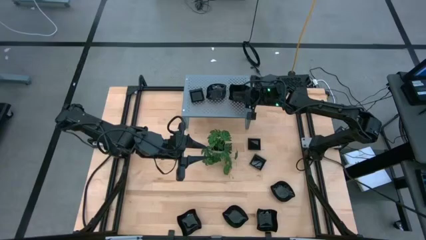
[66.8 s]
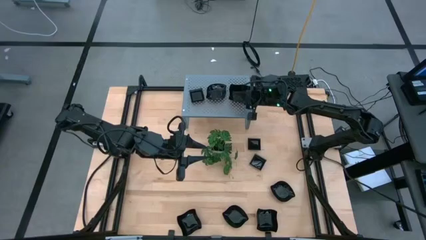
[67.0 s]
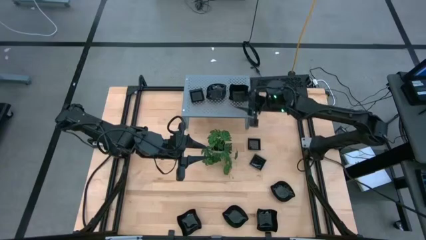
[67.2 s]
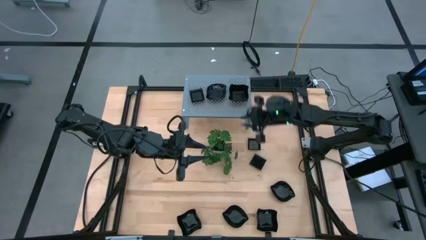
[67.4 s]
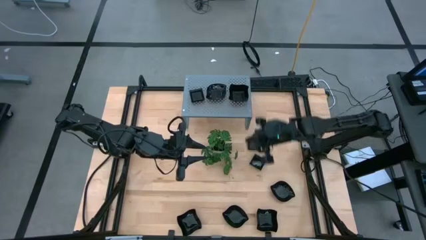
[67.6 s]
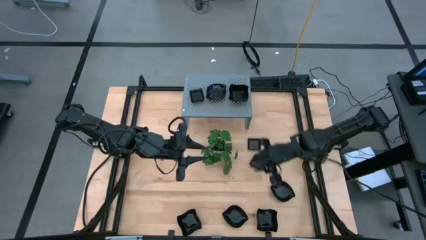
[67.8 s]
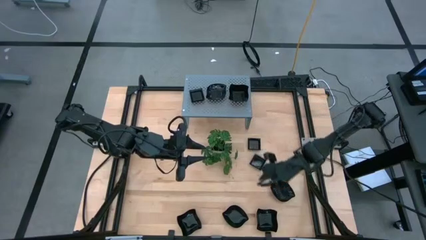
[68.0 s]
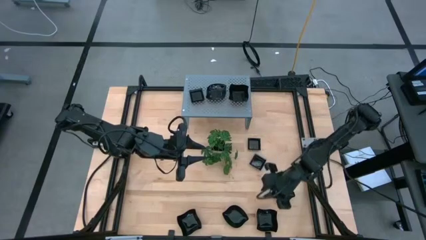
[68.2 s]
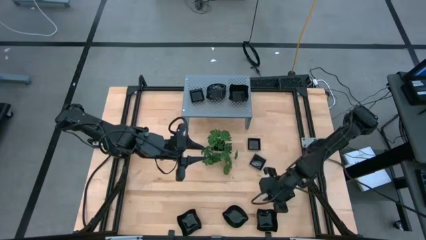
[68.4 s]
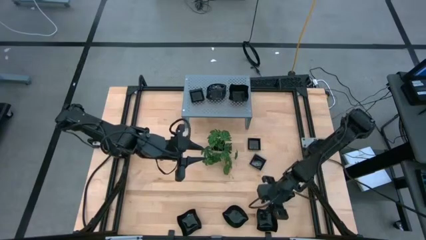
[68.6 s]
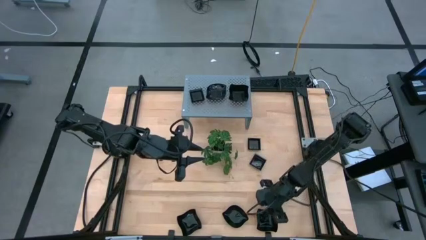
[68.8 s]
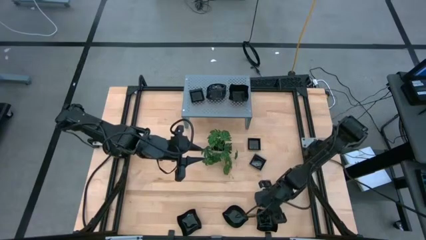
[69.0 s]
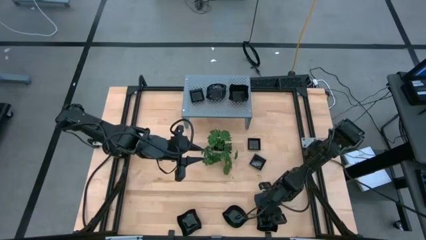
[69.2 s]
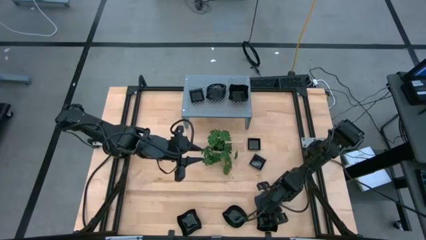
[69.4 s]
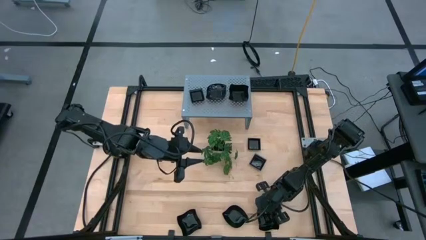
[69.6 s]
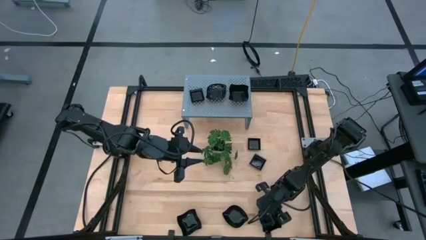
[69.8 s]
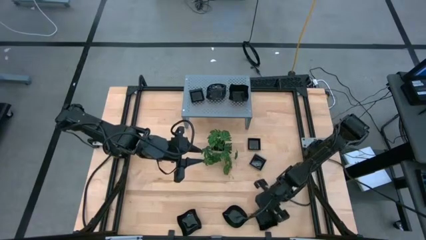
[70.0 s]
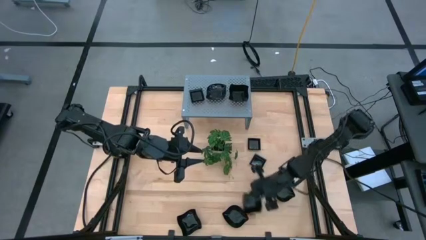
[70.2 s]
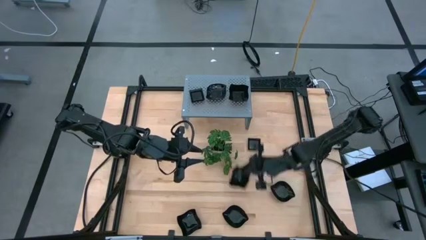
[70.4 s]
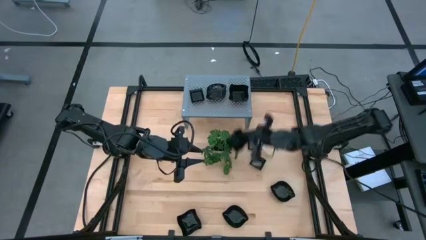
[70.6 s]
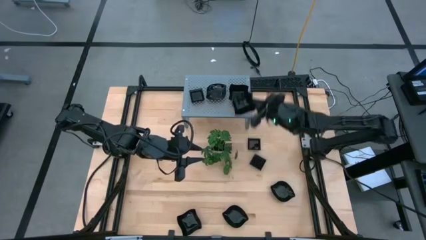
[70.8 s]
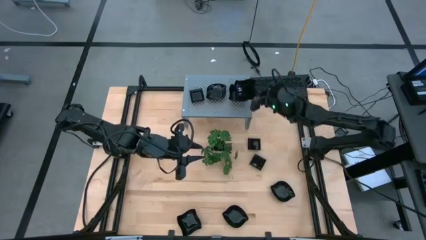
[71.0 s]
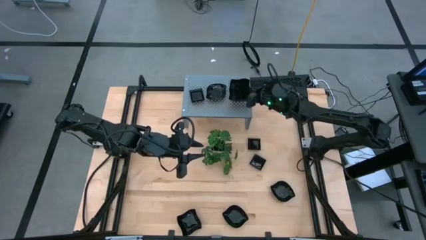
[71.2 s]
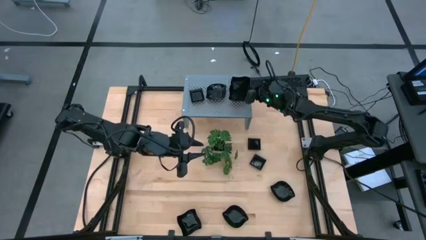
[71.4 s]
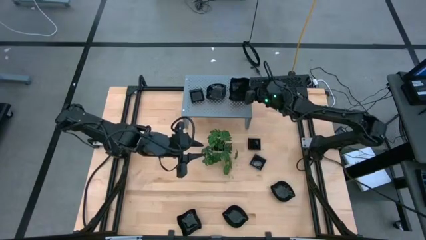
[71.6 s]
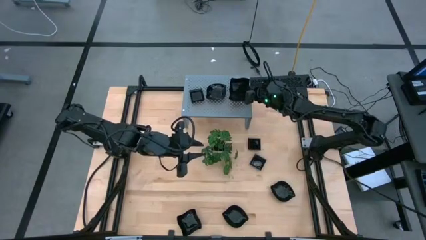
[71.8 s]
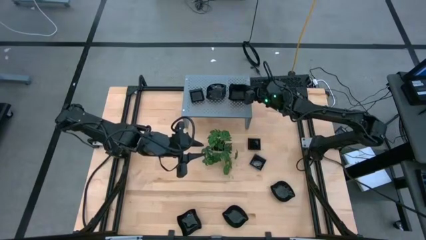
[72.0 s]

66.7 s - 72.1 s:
Task: Pick & Place Mini shaped plates
Stack the black distorted square shaped plate on top of the other black distorted square shaped plate on the shelf

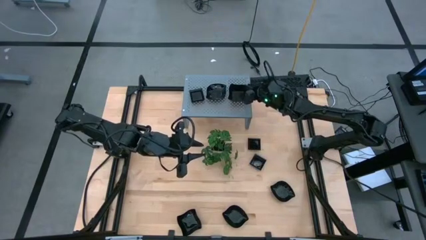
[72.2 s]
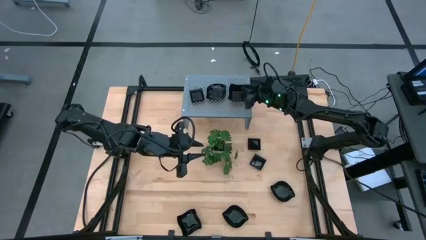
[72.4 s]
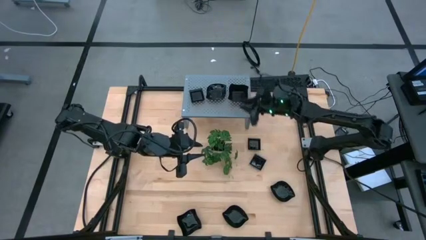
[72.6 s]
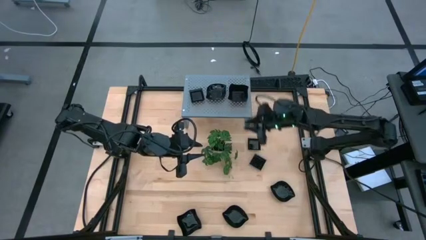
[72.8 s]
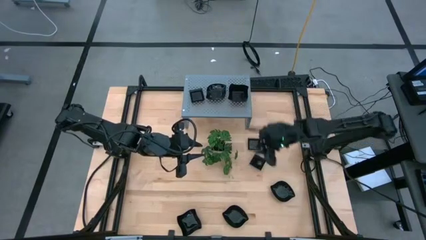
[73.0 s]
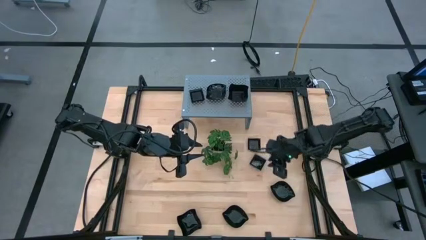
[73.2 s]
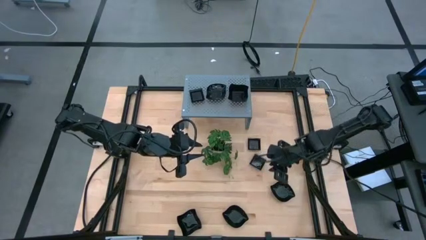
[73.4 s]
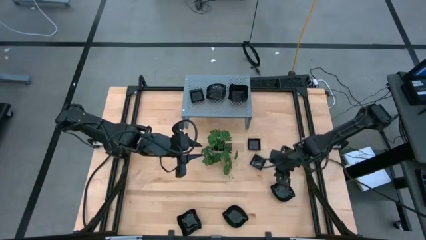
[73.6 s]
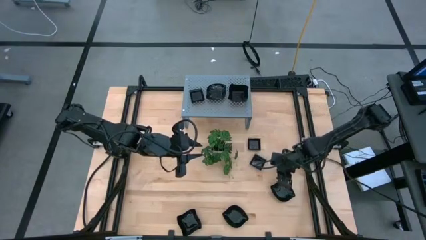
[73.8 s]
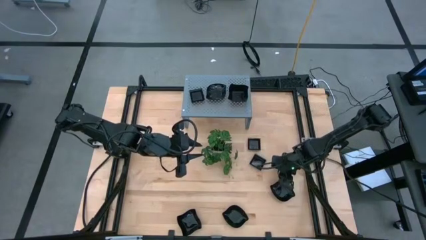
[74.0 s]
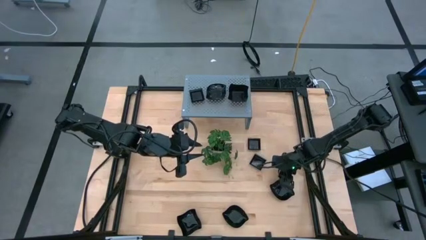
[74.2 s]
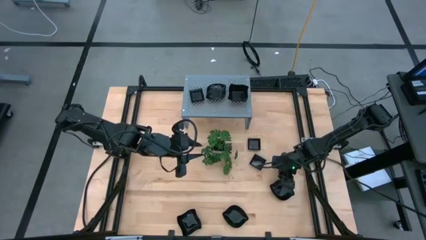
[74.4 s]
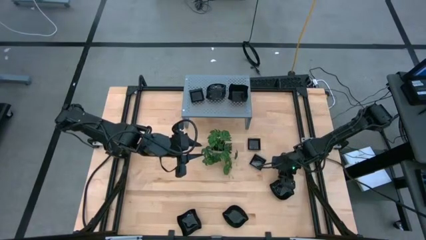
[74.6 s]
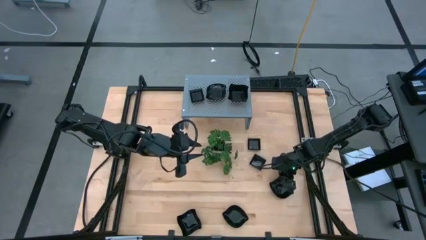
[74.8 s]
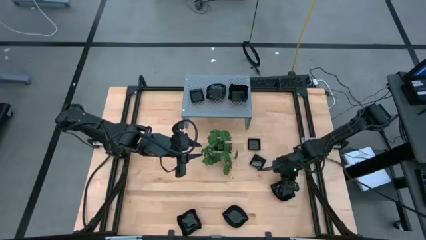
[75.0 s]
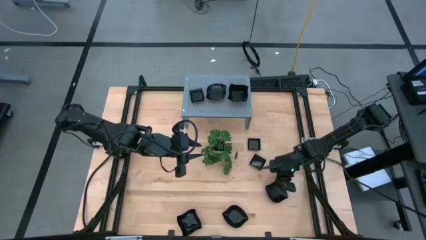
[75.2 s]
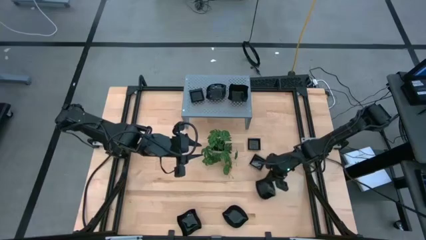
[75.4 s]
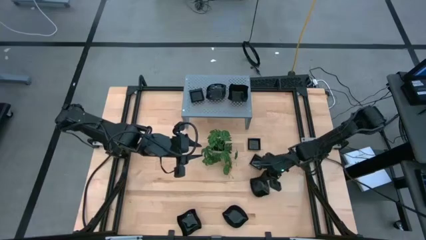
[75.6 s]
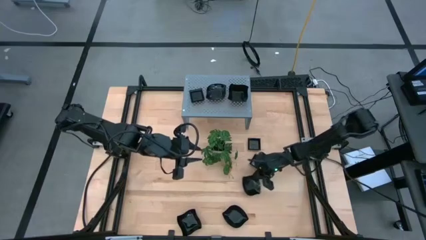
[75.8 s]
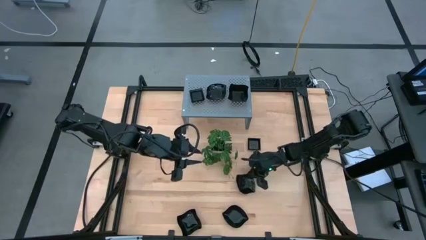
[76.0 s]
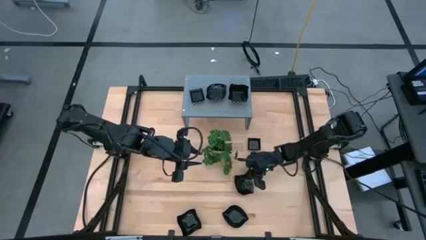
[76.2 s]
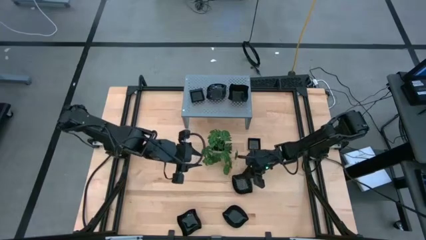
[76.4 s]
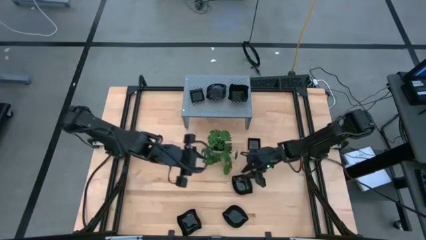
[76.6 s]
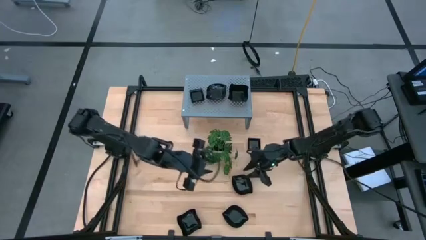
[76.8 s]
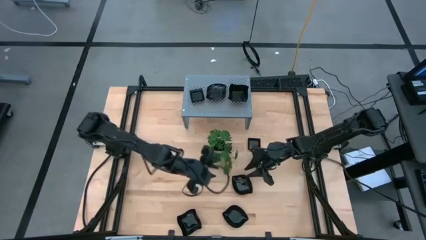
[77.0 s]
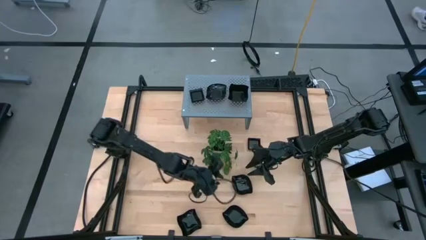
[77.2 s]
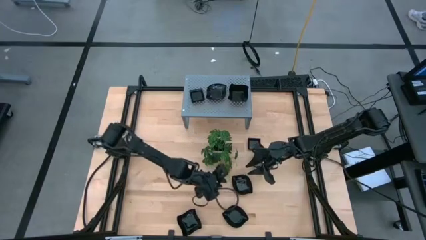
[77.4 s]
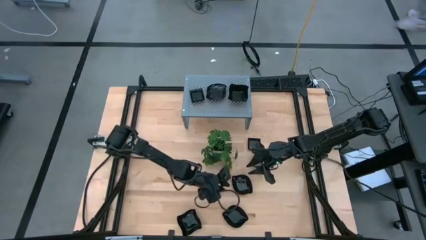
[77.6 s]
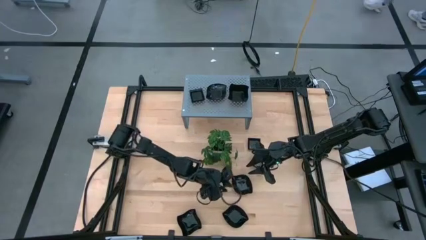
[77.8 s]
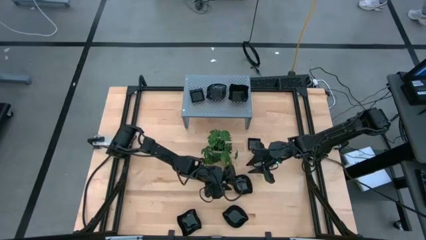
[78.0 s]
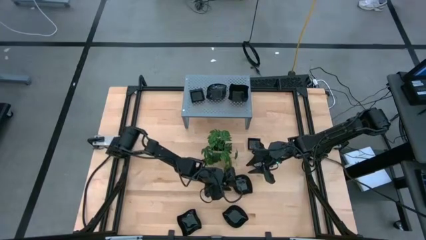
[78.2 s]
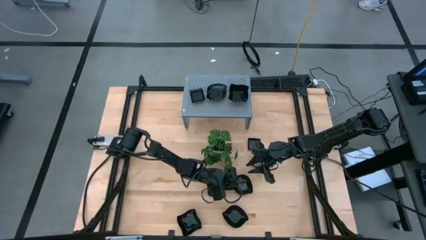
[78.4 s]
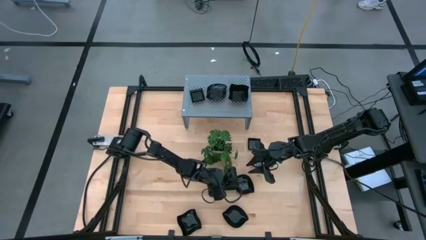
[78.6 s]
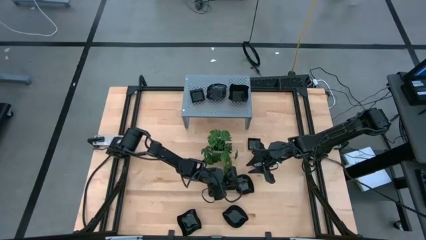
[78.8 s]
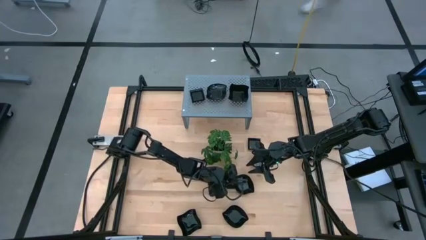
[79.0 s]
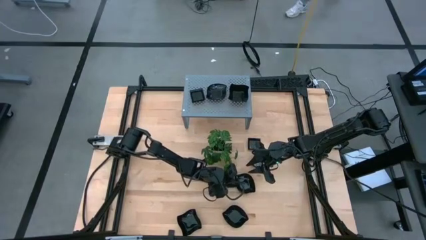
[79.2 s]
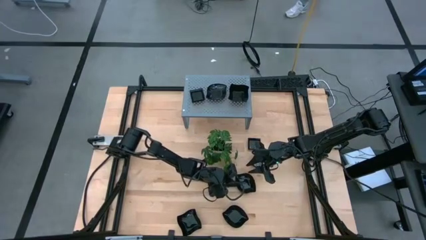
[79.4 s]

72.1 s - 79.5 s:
Stack the black leaf shaped plate on top of the other black leaf shaped plate on the shelf

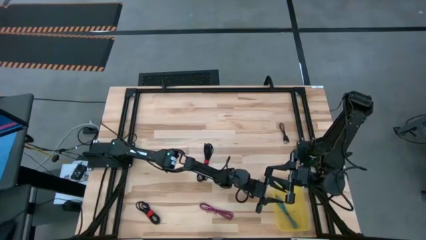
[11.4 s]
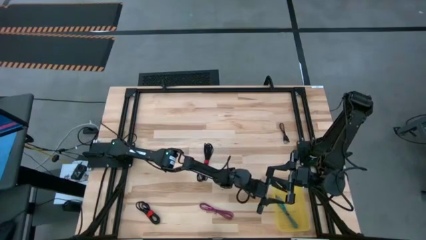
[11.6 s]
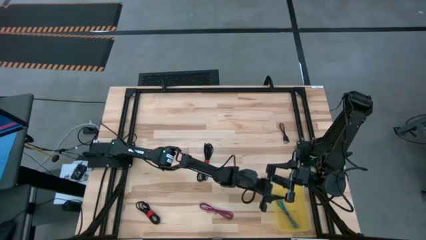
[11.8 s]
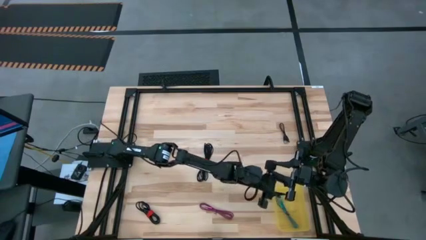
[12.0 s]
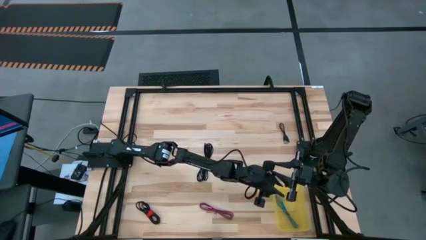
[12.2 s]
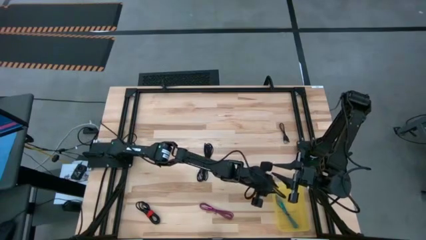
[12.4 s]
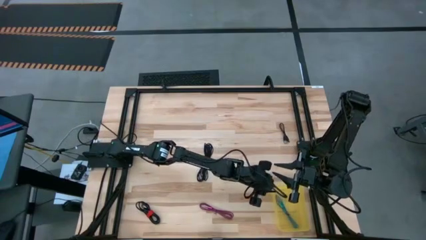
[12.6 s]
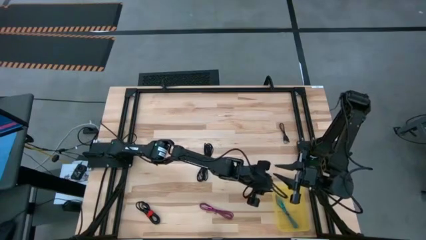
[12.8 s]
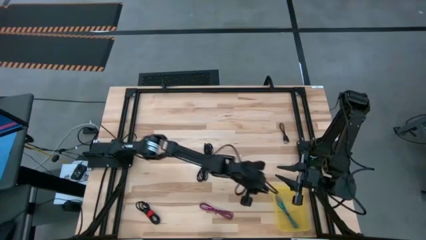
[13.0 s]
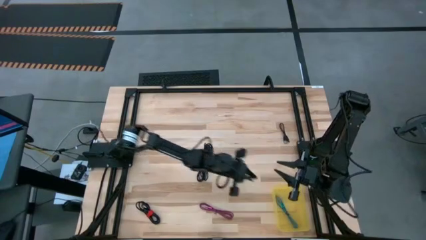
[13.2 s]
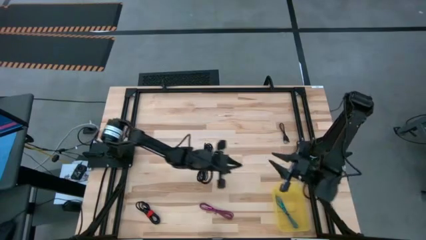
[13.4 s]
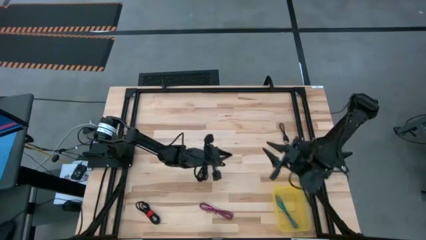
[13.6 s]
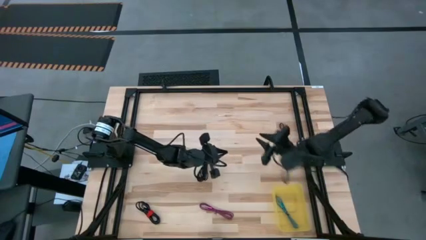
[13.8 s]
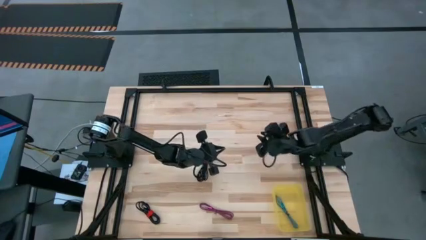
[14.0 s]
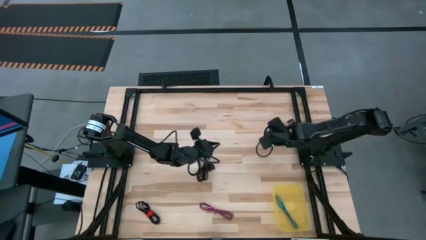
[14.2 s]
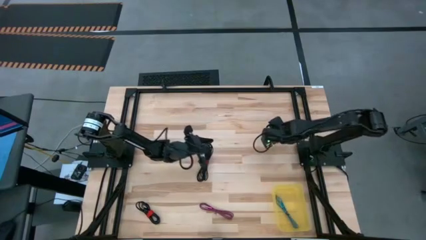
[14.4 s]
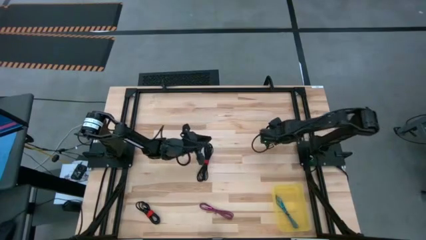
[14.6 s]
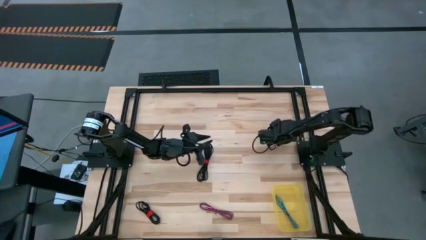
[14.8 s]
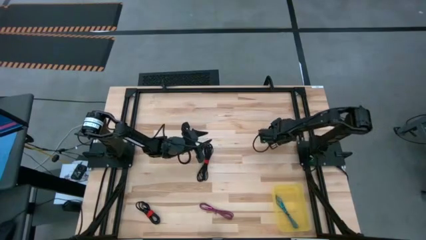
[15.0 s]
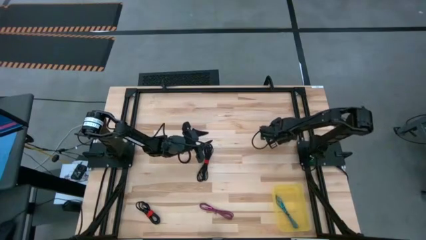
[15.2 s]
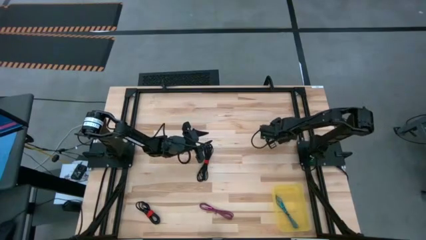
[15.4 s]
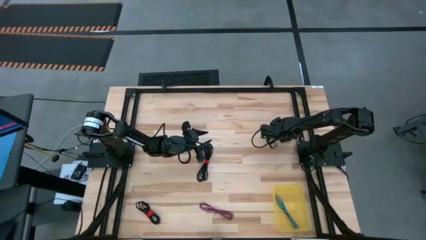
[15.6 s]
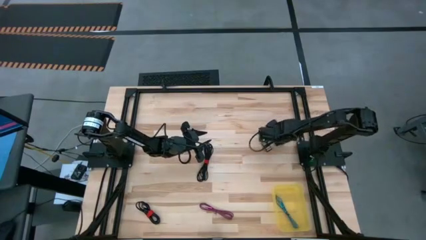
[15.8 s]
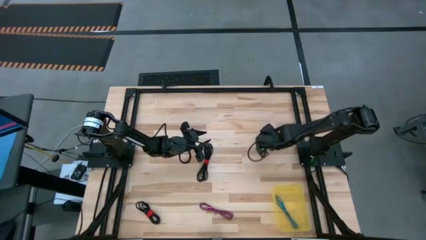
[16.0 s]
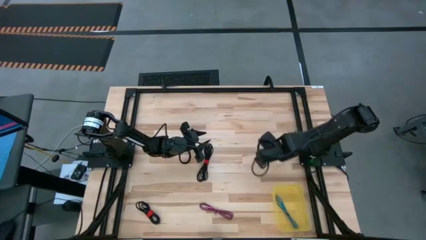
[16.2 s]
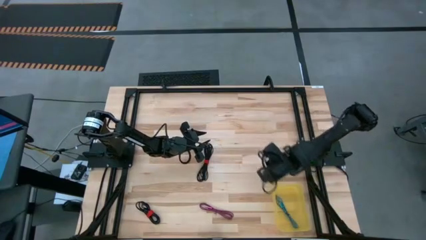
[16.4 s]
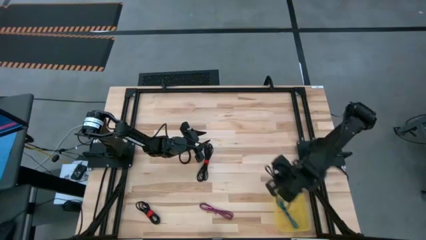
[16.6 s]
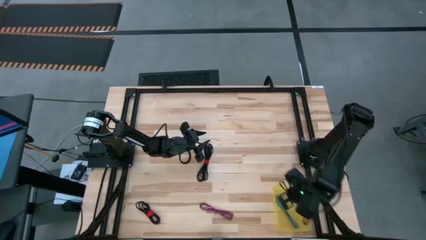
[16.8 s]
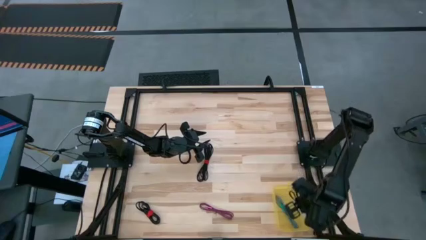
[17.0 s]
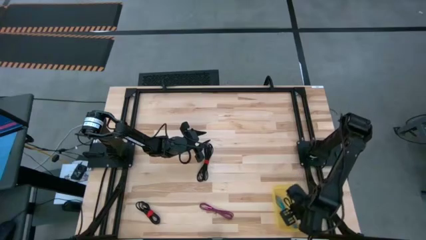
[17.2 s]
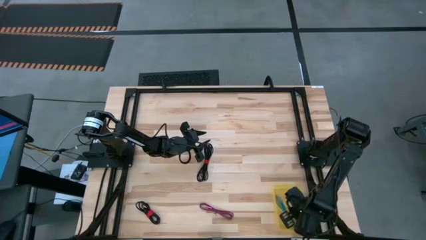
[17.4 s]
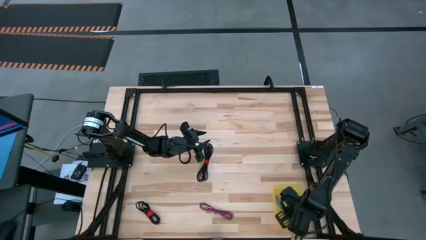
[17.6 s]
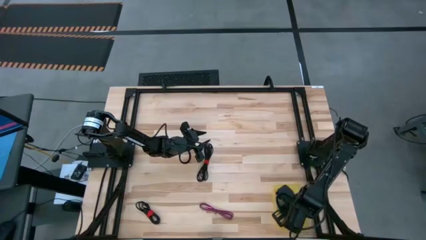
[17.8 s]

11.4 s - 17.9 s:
Task: Pick and place USB-C Cables
Put the right black cable charger into the yellow bin
